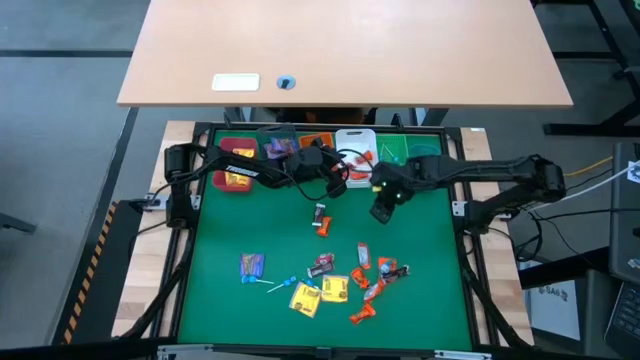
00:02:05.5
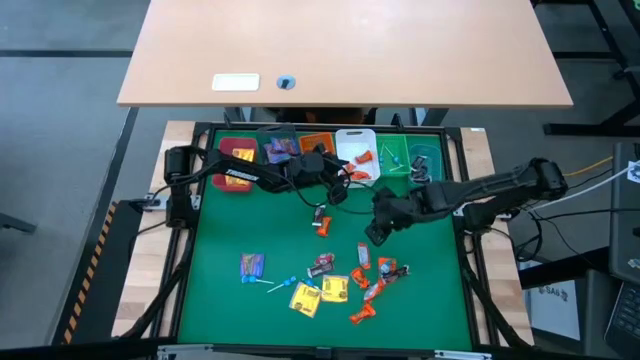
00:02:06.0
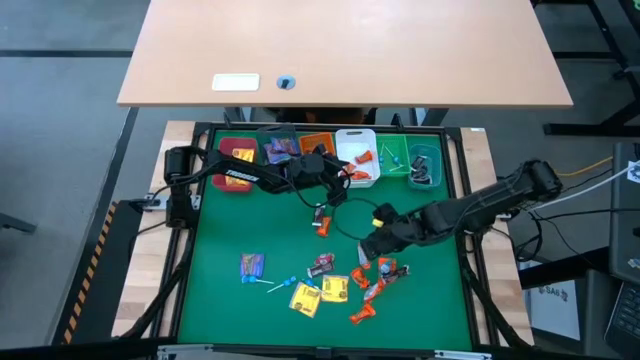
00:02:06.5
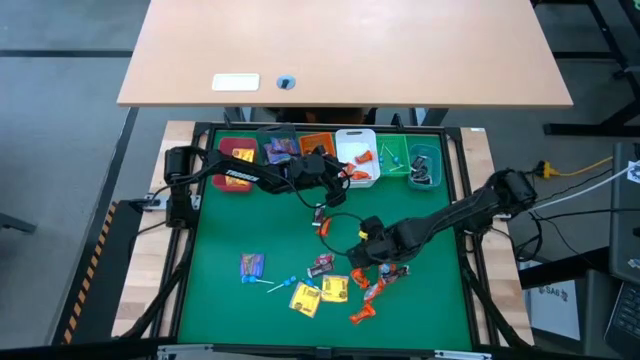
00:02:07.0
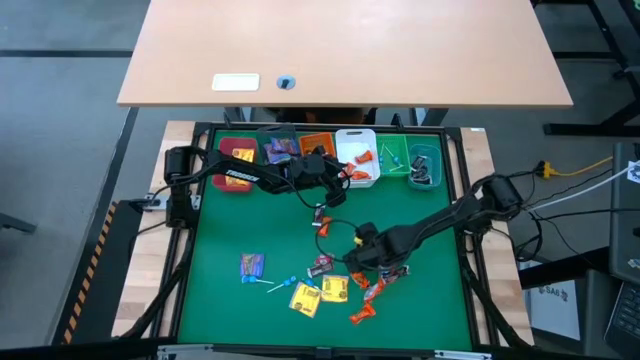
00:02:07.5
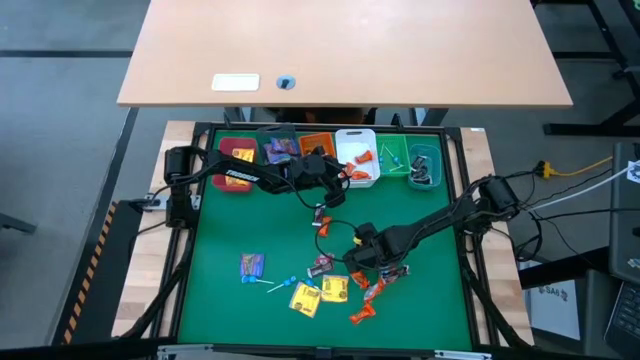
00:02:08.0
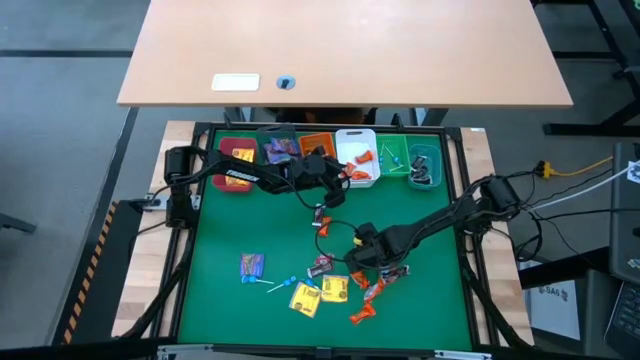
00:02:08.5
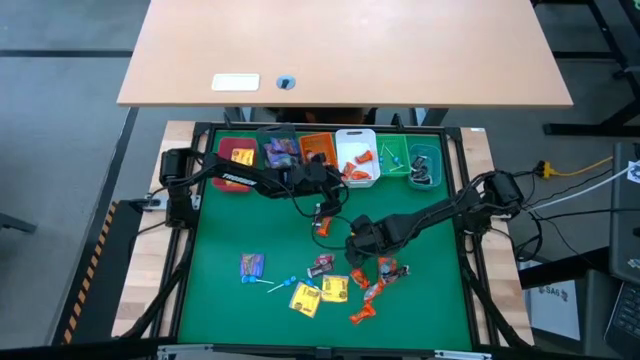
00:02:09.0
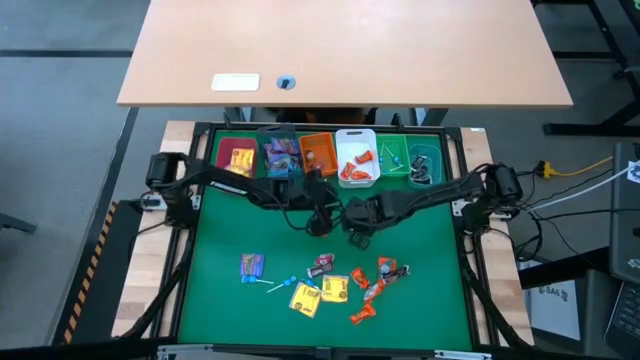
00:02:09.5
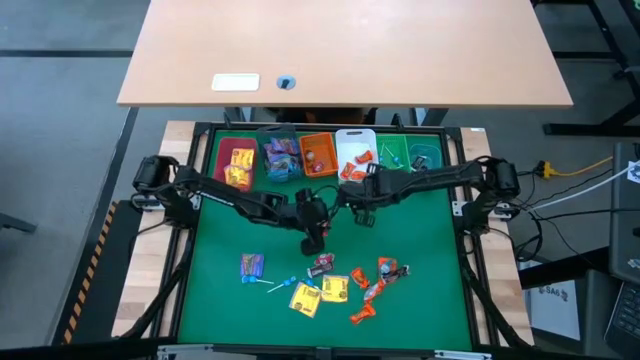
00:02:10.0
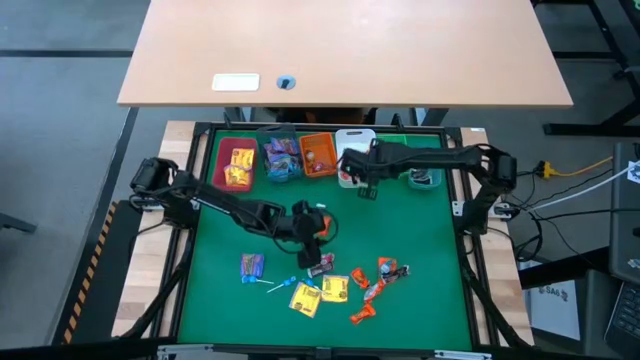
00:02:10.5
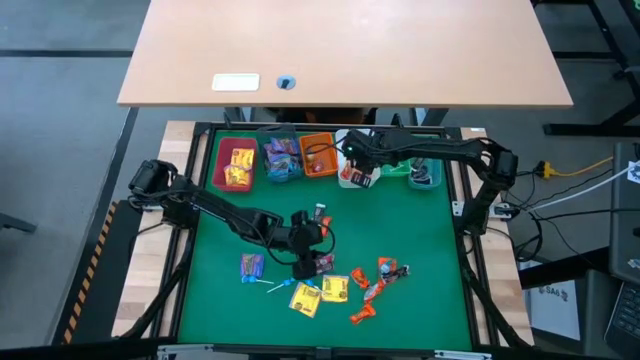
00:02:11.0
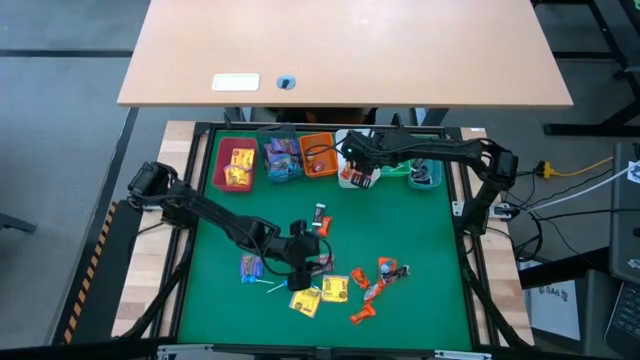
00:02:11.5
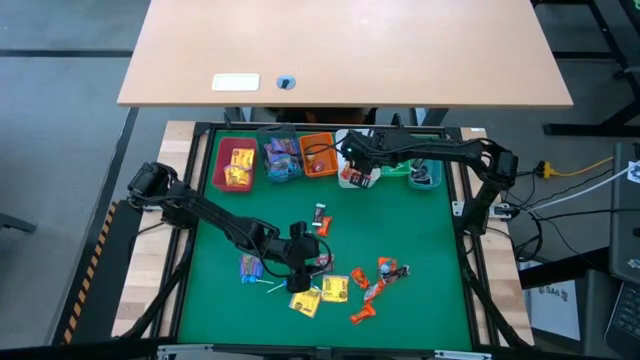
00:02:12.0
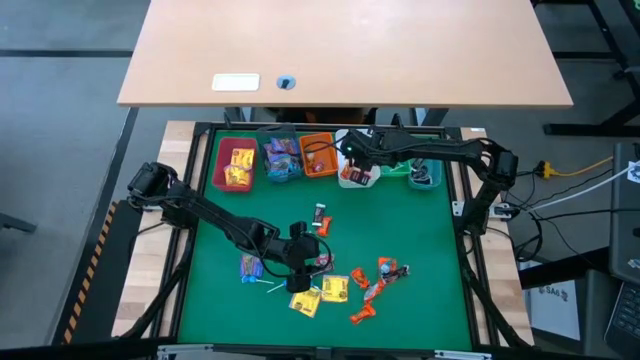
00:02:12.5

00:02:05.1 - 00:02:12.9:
Task: Sort candy
Put the orange chocolate into the white bin

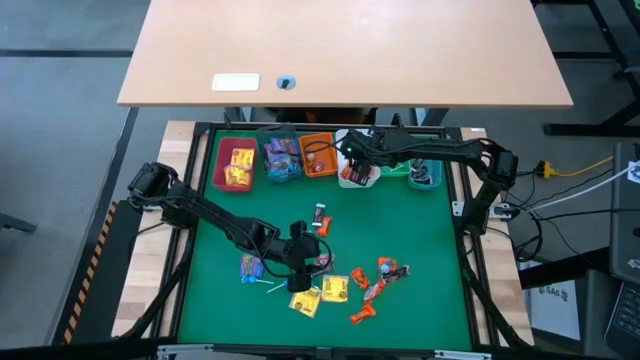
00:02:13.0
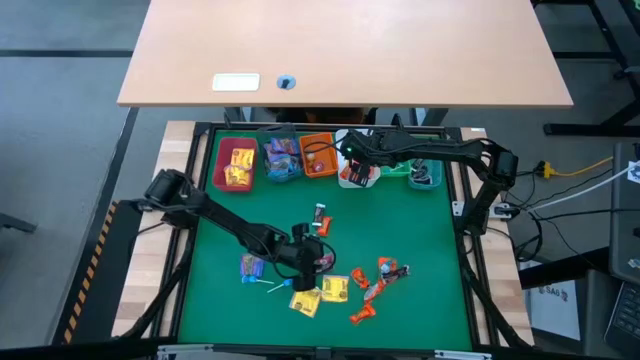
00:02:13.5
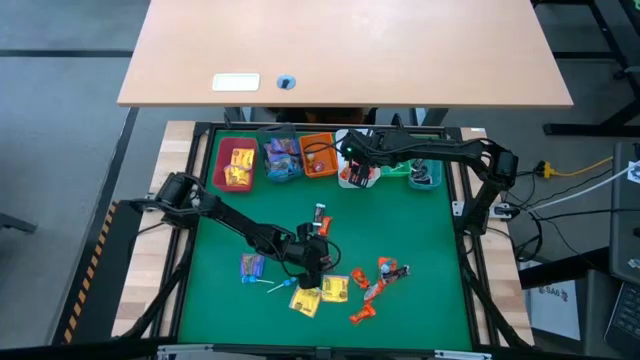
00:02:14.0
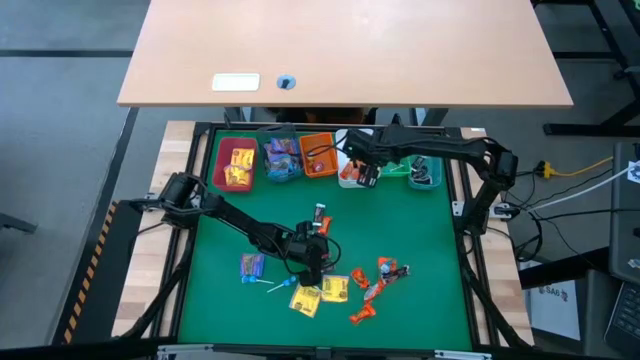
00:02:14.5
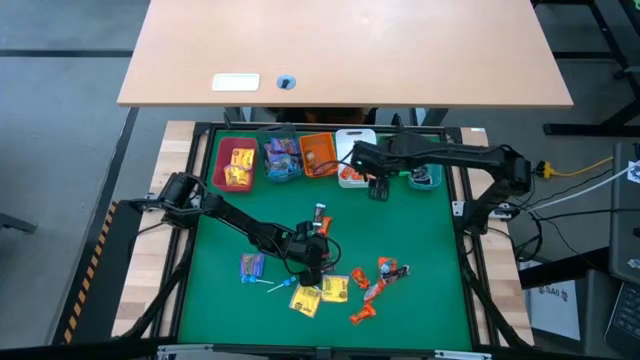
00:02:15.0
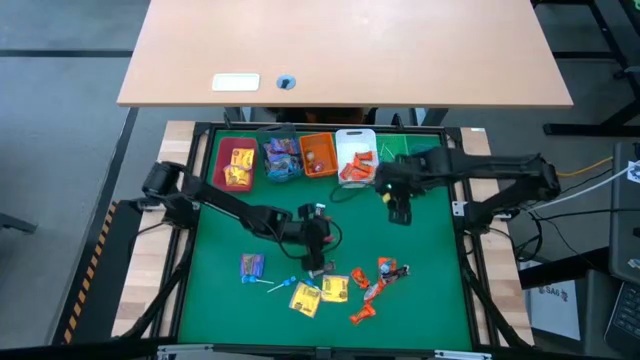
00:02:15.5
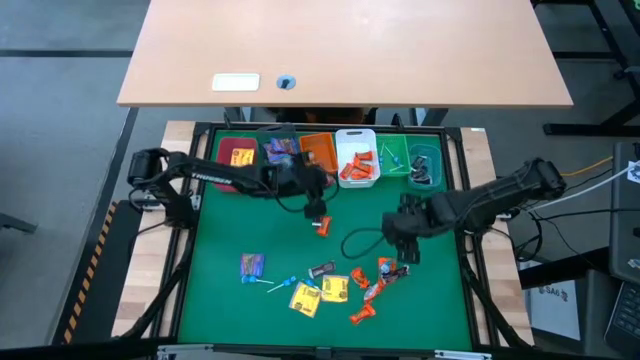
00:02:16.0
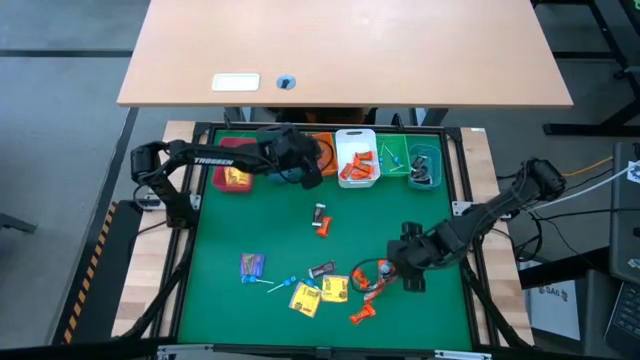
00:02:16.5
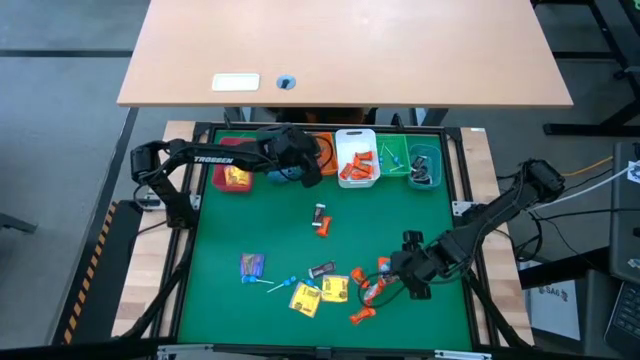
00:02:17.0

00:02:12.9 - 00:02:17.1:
Put the red chocolate into the orange bin

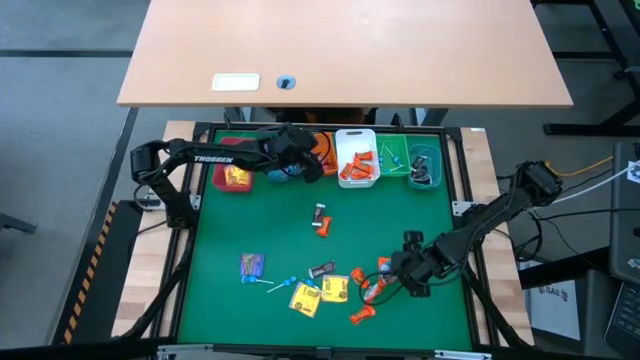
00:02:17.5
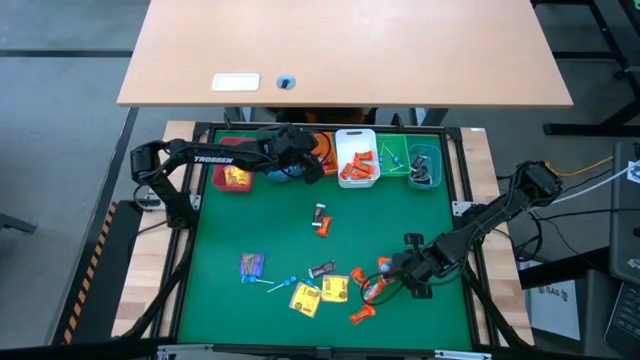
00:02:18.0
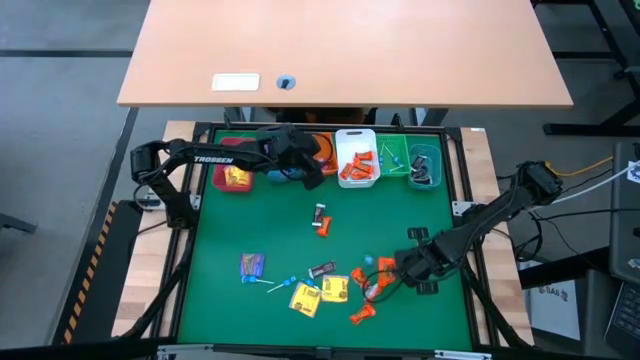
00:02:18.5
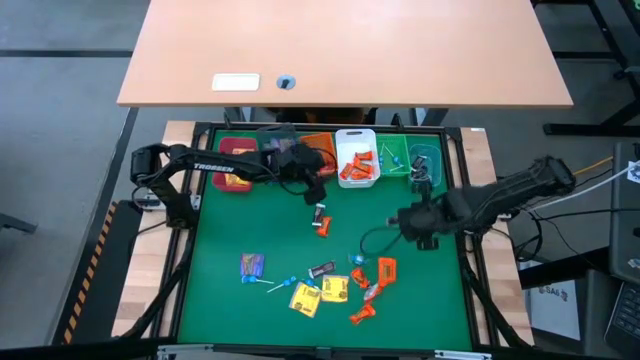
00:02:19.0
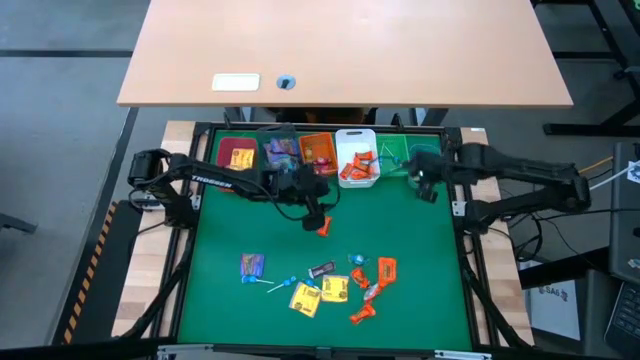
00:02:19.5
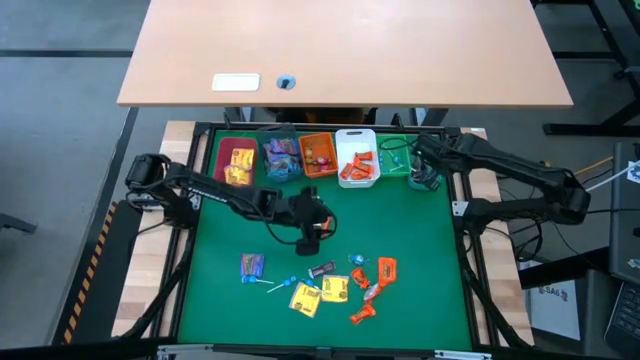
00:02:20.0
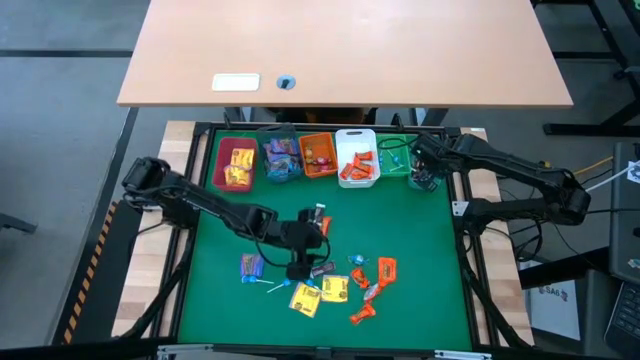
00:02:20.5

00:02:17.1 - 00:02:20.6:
Put the brown chocolate into the blue

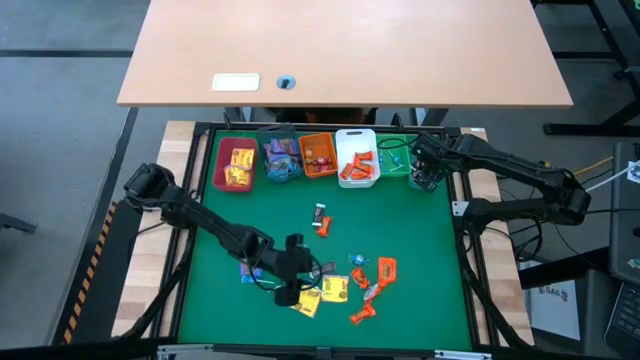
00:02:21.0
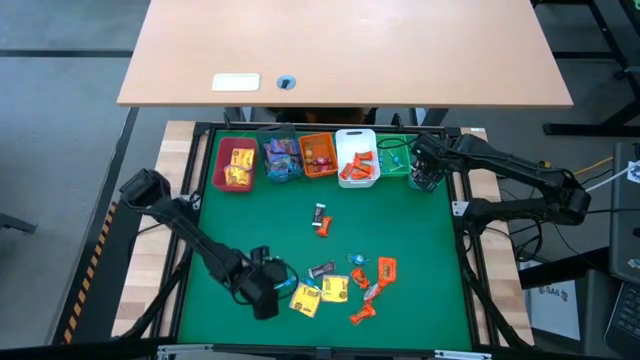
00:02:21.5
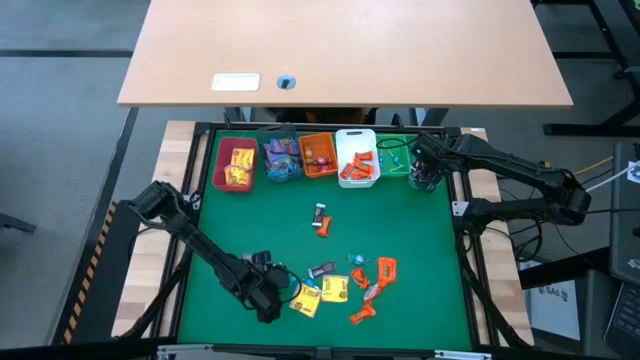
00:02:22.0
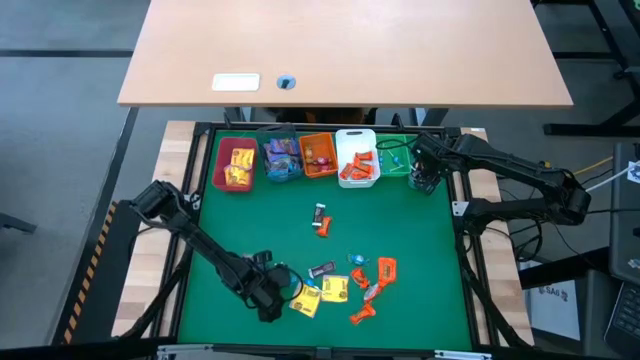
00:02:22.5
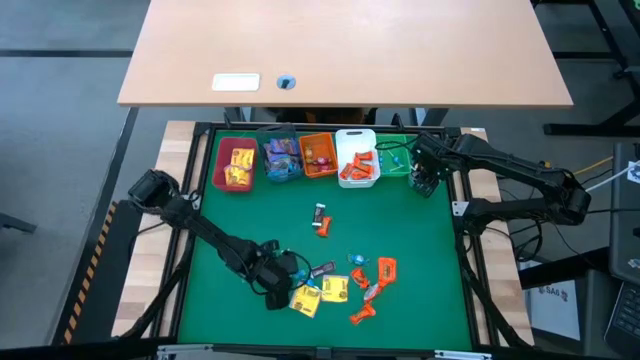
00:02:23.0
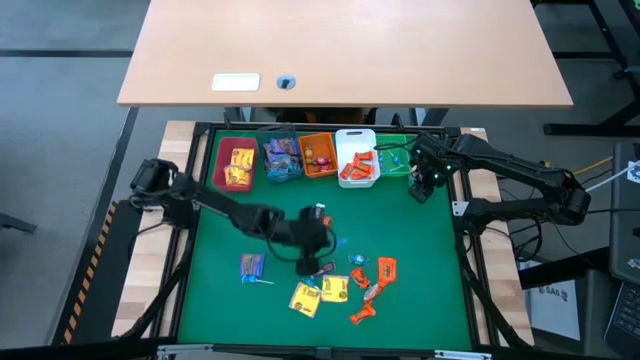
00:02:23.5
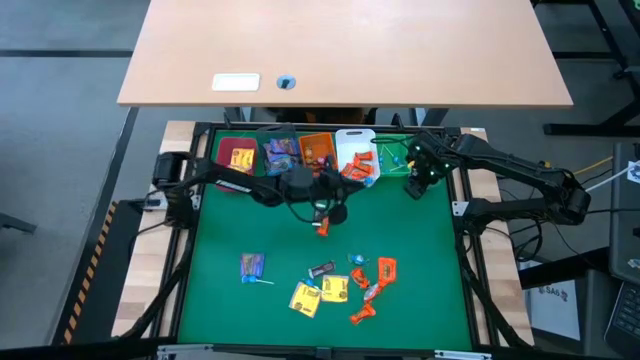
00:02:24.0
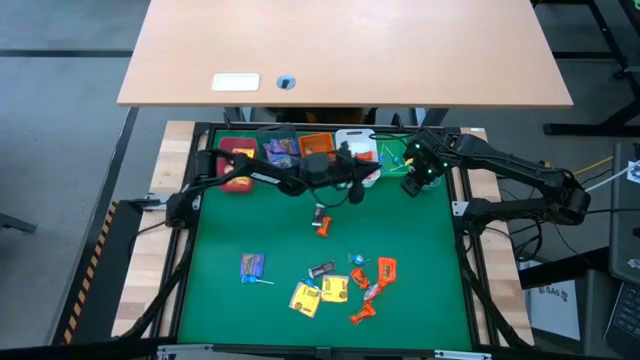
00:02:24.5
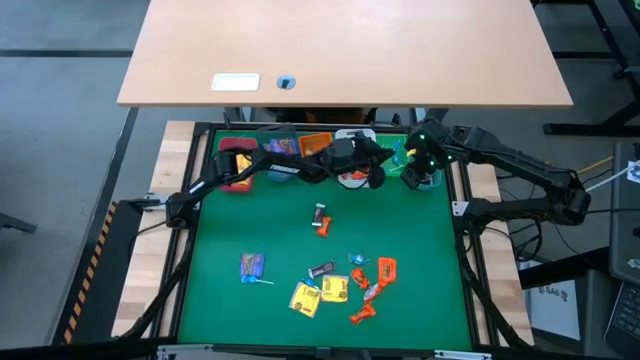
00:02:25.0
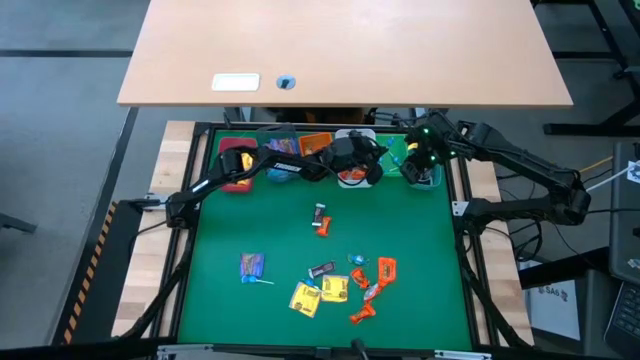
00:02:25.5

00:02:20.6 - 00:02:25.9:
Put the blue lollipop into the green bin
